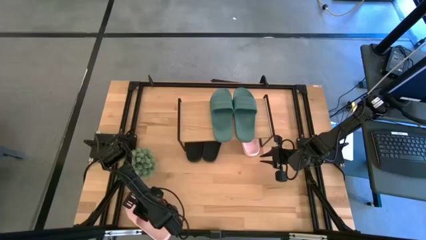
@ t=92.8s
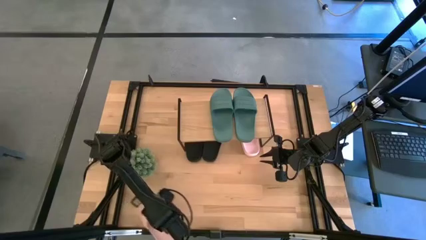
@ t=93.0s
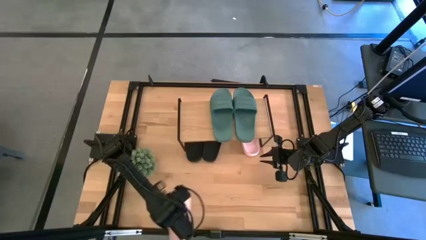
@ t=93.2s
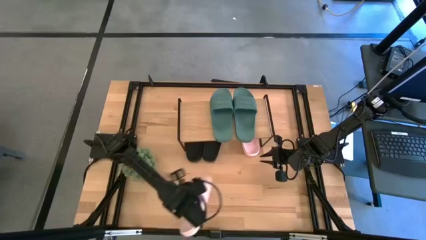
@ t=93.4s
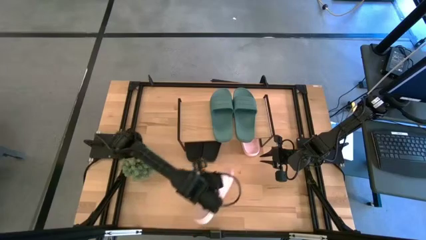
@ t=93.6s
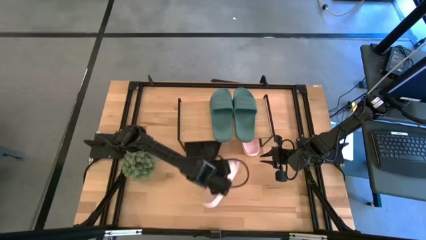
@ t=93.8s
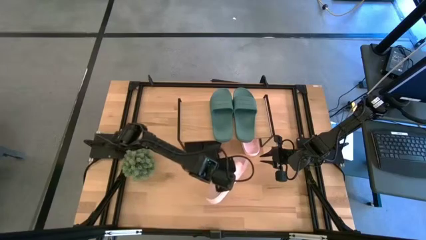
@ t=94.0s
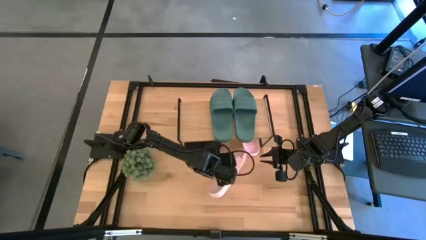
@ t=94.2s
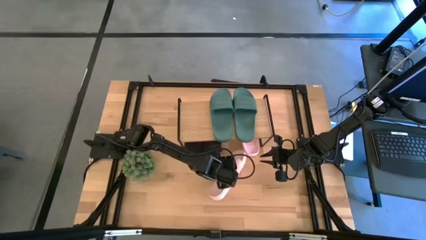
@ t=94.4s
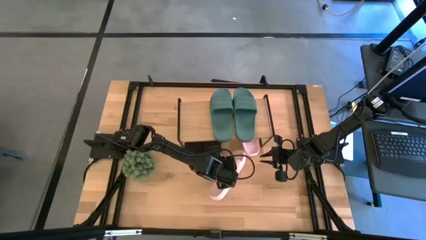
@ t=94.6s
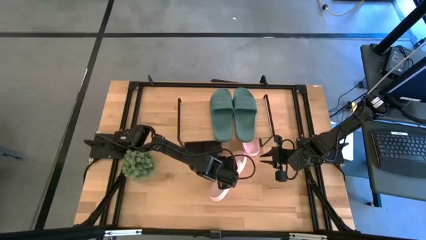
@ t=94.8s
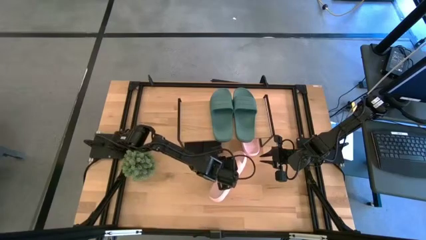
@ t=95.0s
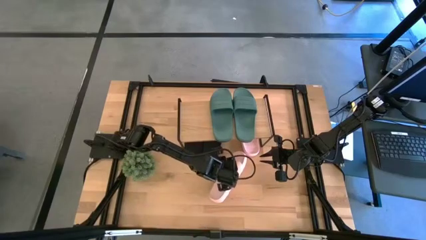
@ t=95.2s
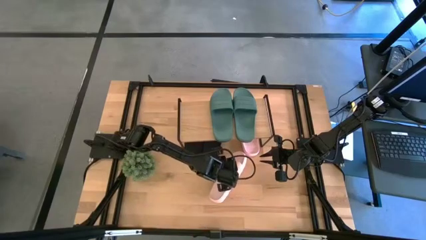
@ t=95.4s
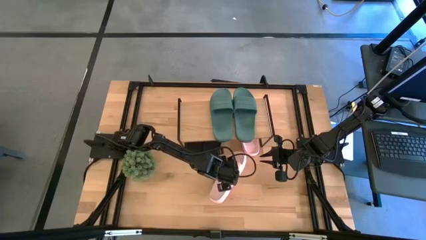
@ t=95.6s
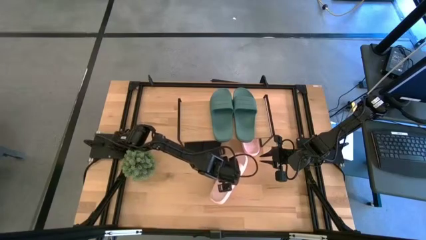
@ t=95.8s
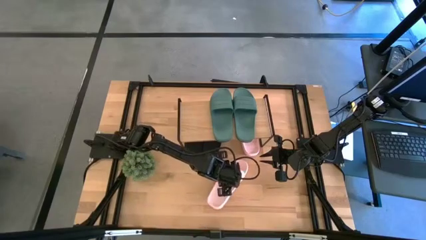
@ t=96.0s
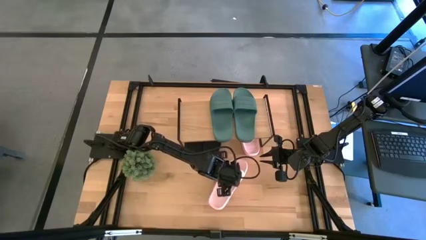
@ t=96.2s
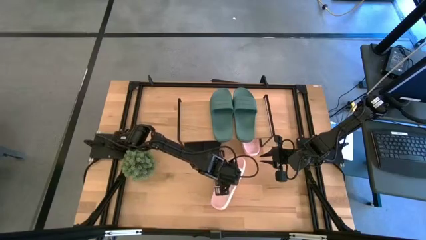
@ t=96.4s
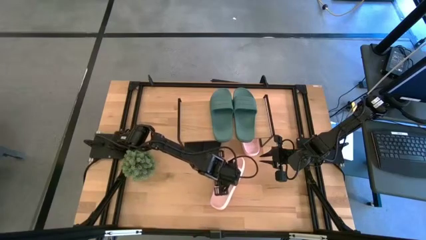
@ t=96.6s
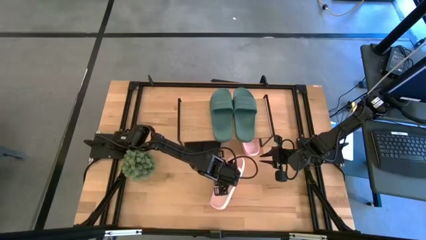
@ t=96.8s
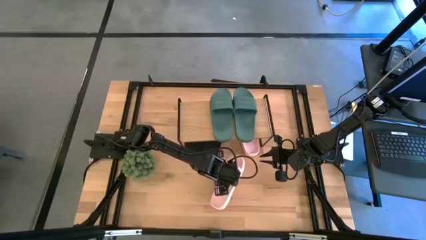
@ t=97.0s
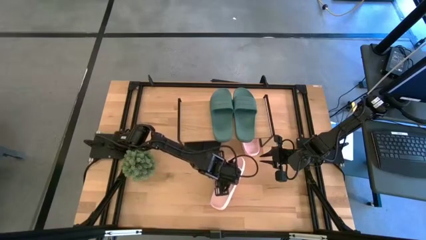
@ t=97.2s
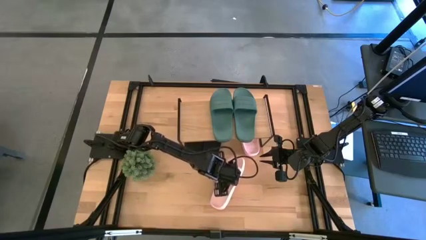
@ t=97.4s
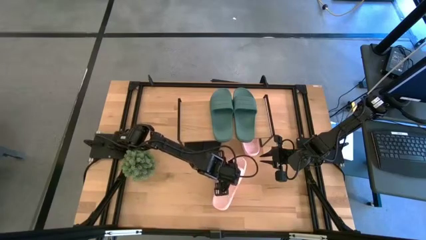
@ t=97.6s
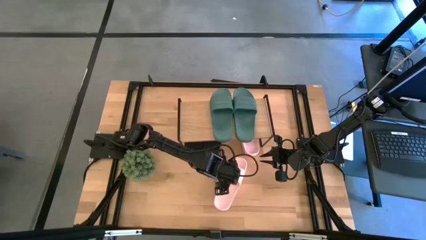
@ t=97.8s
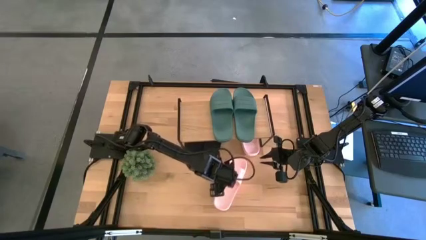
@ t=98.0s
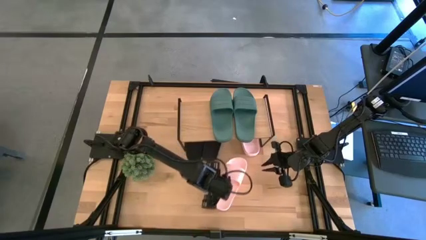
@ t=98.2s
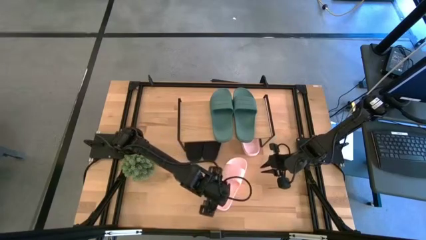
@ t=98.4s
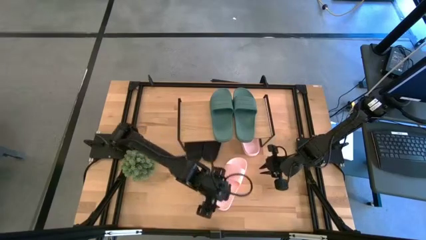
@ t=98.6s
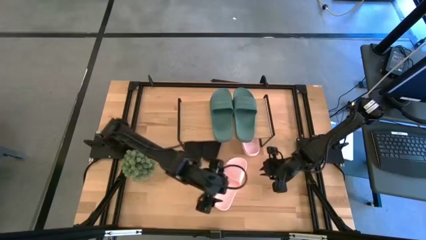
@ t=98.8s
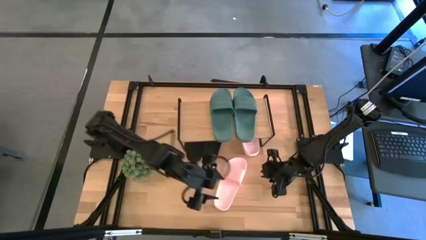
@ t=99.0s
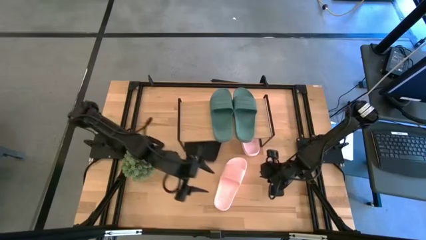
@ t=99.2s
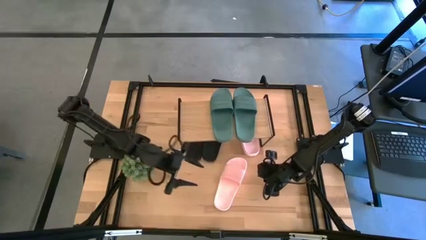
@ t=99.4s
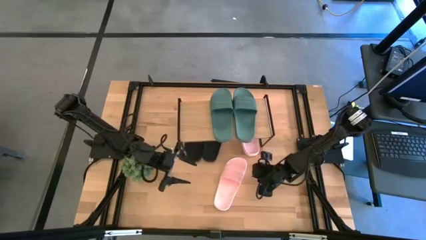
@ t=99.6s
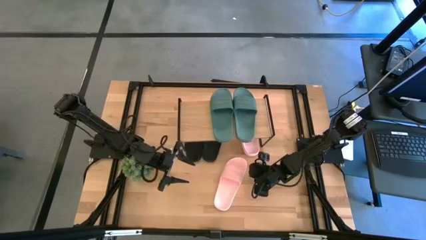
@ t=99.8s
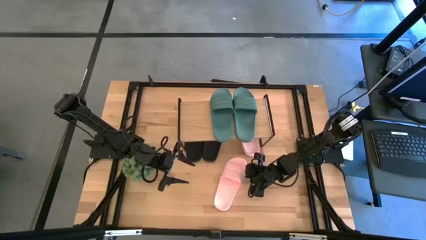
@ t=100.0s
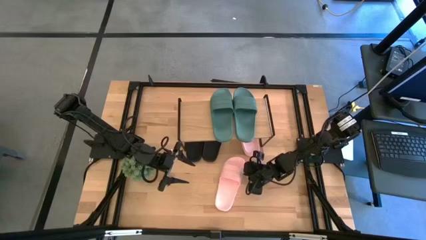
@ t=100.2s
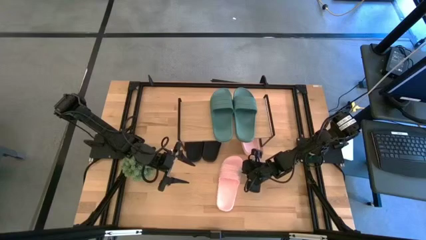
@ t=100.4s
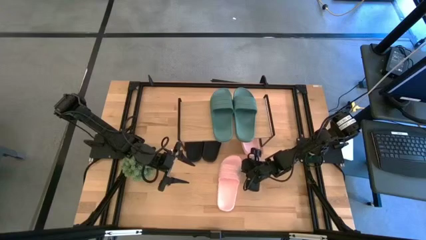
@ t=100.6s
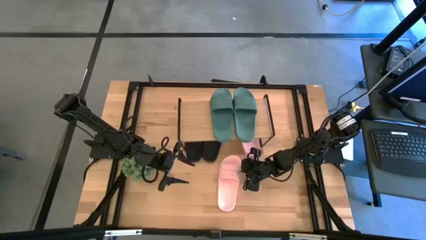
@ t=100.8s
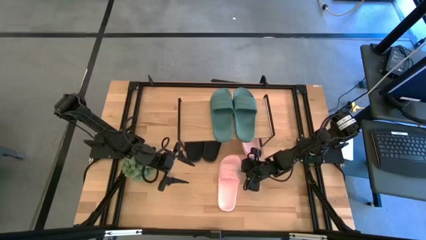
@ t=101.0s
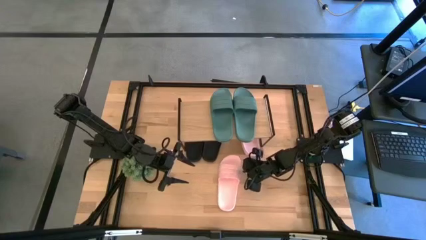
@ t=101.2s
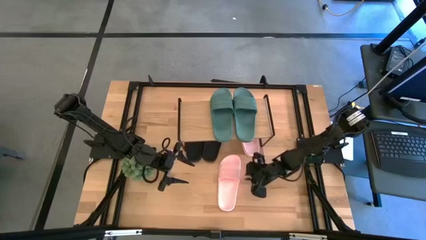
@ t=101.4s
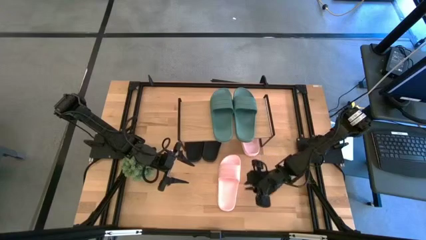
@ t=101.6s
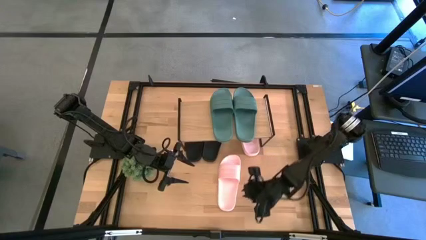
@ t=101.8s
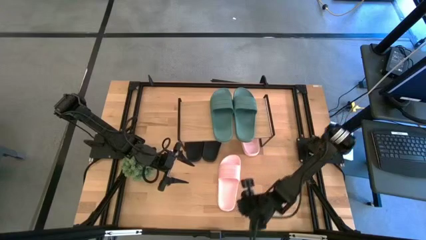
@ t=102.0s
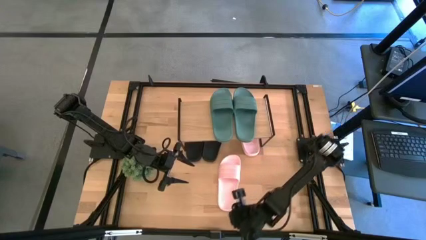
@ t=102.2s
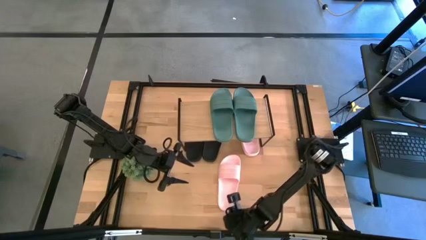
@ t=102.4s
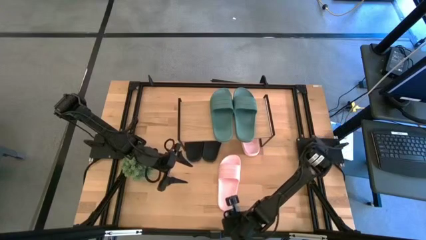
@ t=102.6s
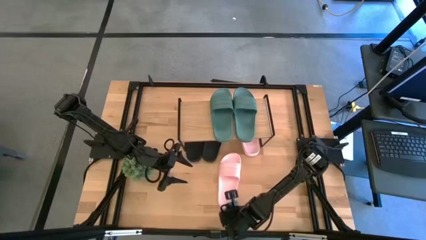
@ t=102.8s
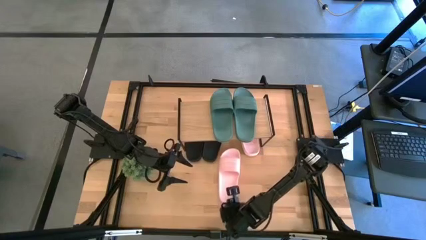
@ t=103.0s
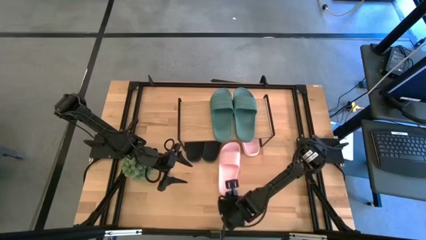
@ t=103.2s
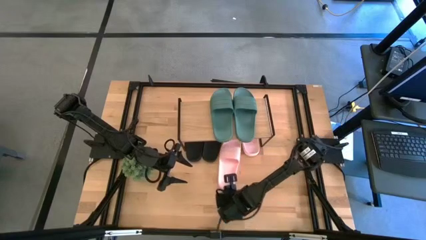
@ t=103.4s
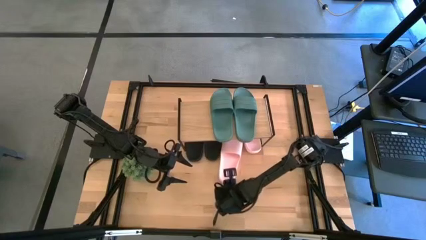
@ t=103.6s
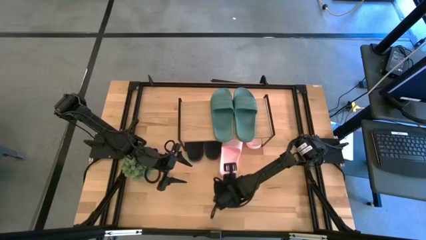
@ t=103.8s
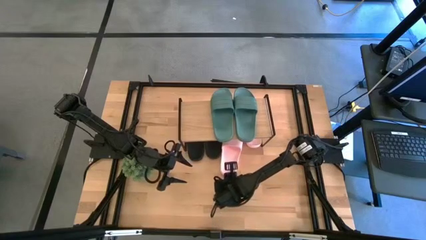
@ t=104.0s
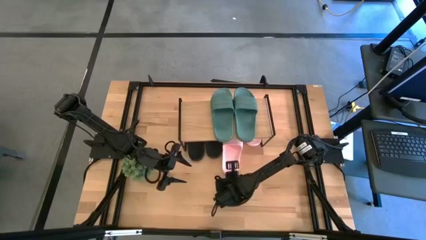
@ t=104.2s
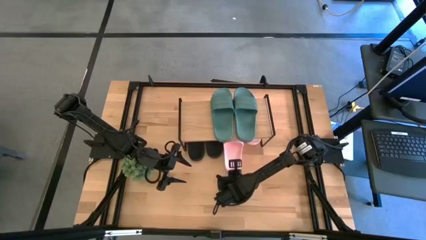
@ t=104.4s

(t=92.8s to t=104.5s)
Task: Pick and place slides into the shelf
Put the pink slipper under the shelf

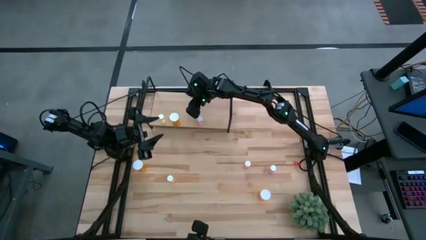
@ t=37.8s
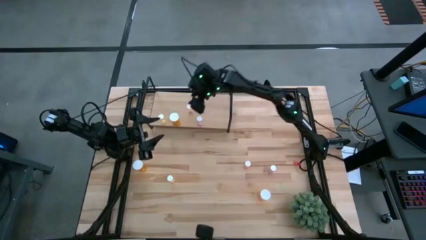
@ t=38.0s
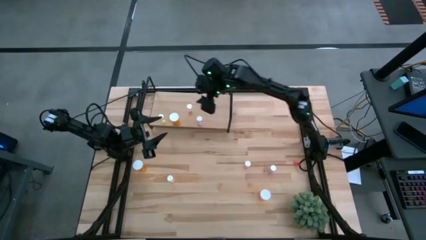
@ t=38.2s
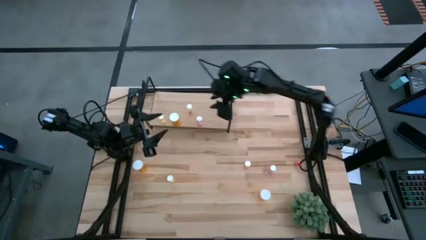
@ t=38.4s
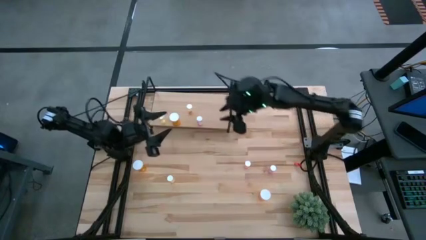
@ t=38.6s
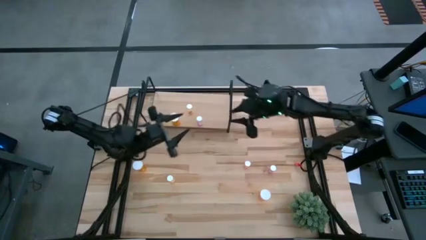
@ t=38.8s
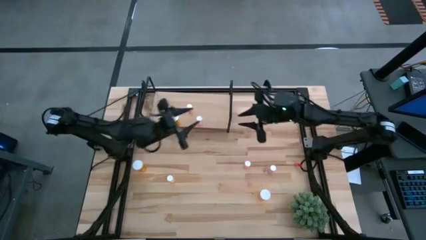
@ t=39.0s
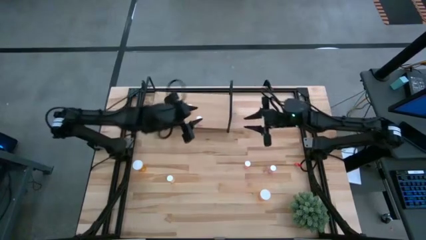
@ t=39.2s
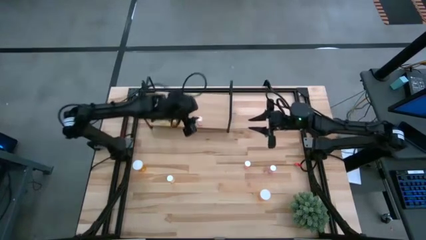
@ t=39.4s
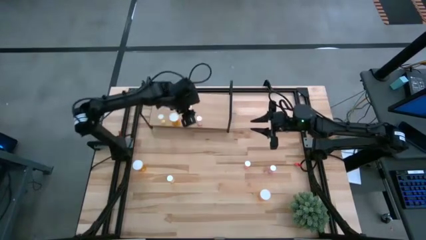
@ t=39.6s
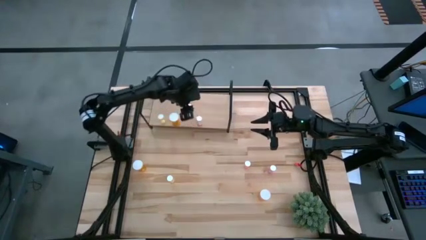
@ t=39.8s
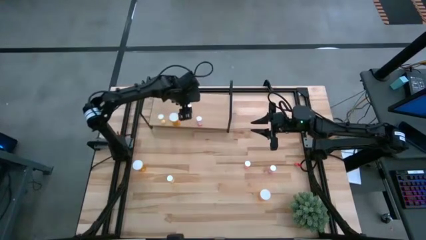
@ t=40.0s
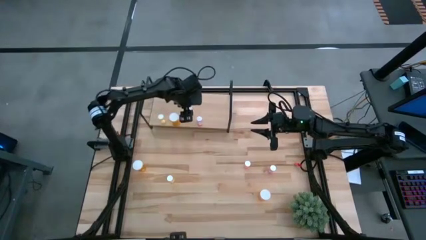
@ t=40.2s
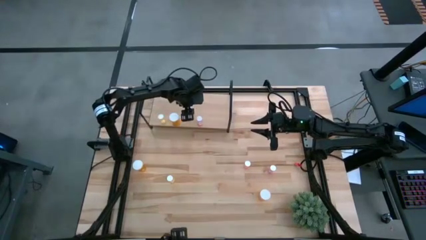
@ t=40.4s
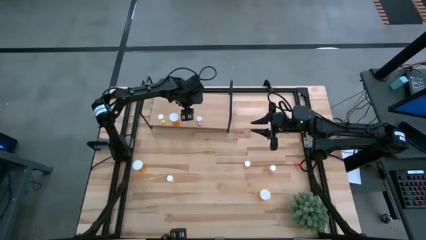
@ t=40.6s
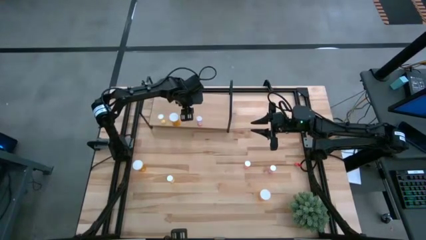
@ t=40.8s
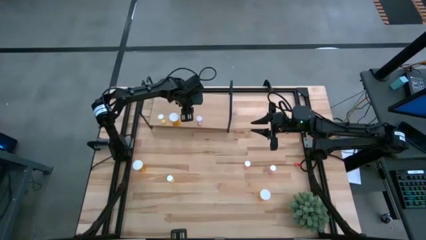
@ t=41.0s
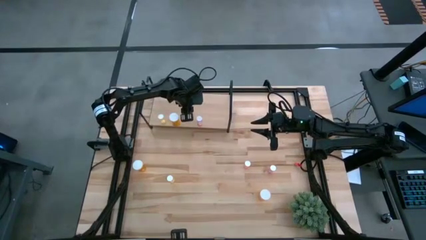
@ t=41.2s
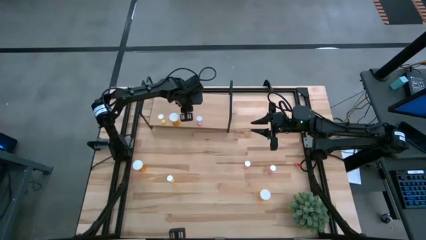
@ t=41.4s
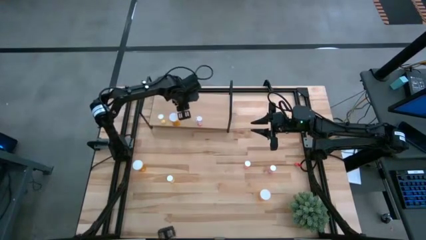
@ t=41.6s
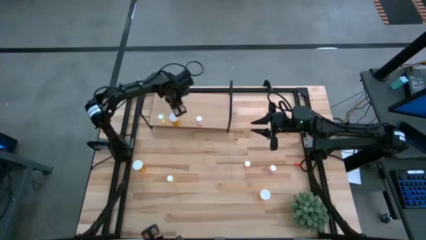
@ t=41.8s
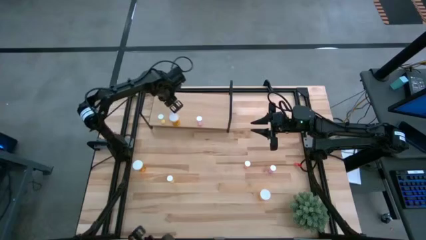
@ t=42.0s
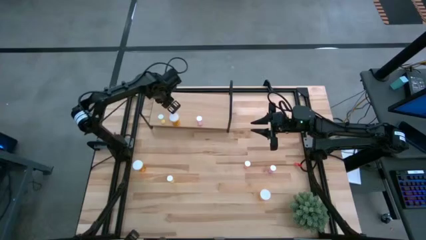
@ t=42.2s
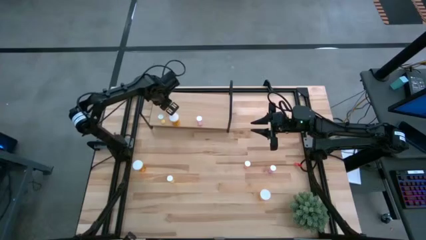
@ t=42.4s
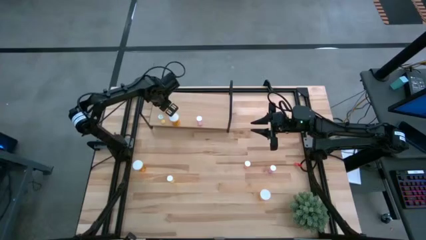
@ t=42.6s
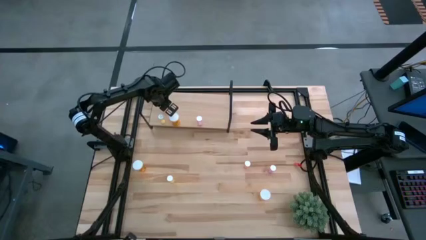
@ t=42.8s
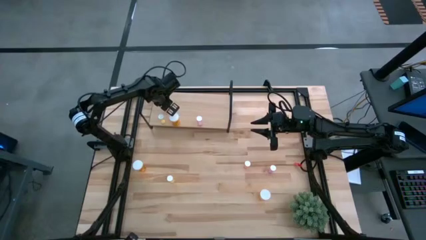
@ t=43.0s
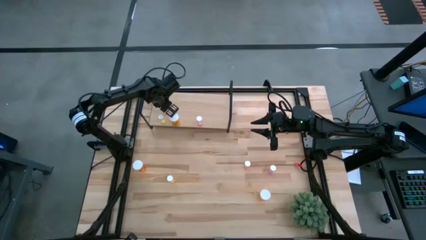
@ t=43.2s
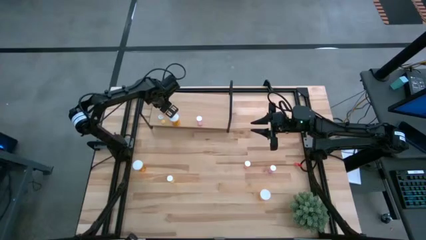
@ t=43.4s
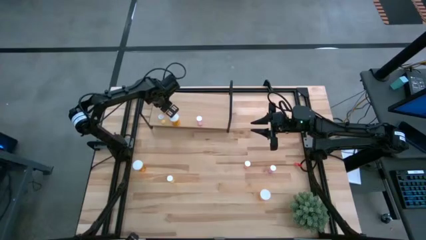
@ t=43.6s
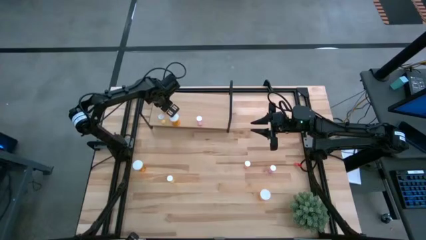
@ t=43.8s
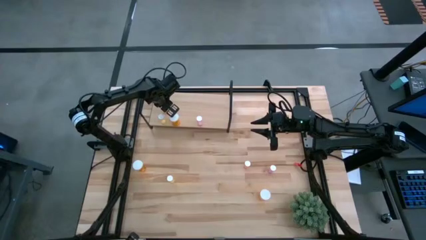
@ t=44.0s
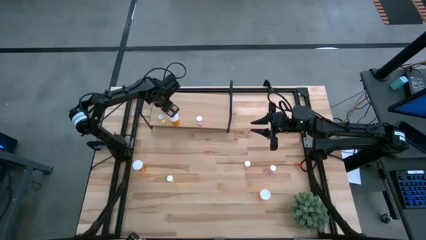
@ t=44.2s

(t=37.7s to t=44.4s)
Task: Pick and place medicine bottles onto shelf by color
Move the yellow pill bottle on the shelf to align with the yellow pill bottle
